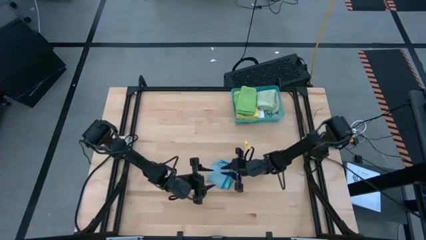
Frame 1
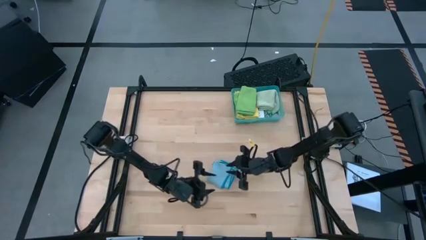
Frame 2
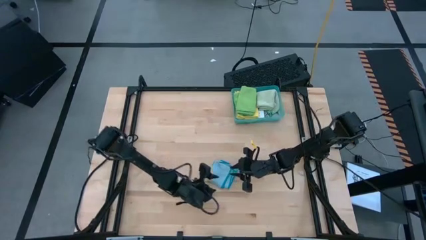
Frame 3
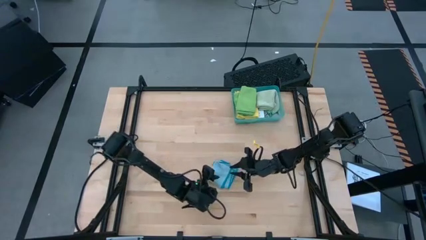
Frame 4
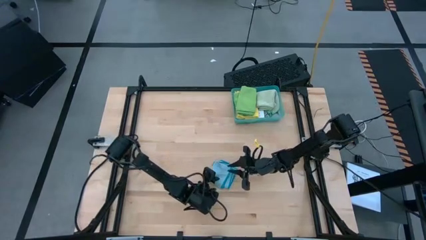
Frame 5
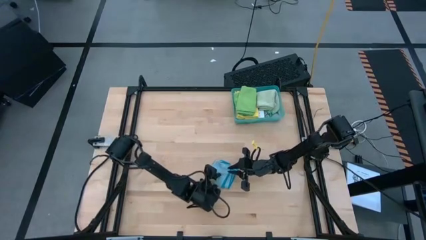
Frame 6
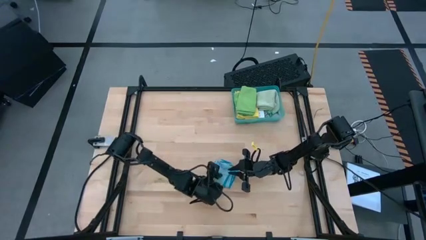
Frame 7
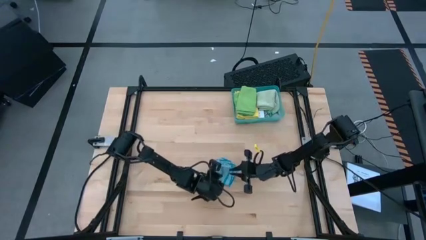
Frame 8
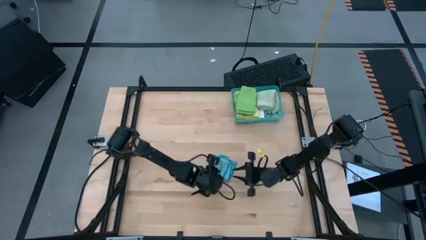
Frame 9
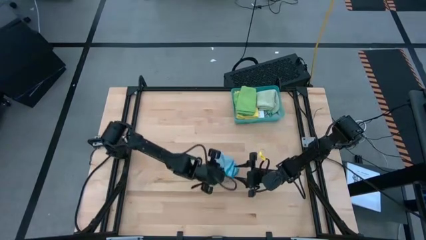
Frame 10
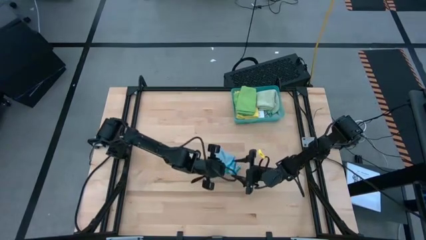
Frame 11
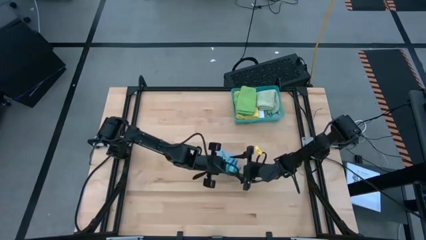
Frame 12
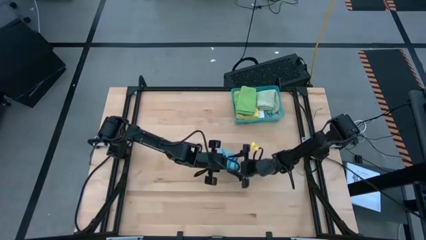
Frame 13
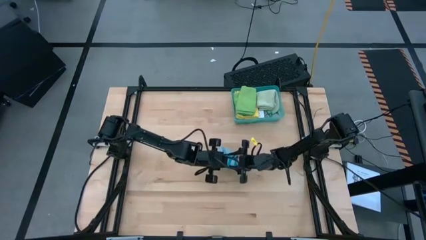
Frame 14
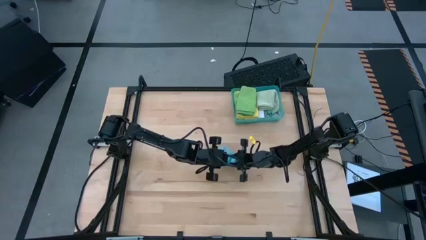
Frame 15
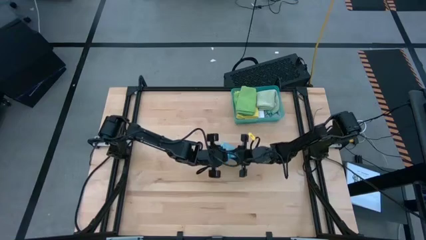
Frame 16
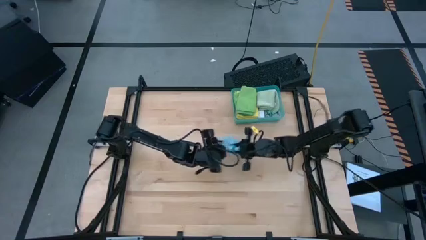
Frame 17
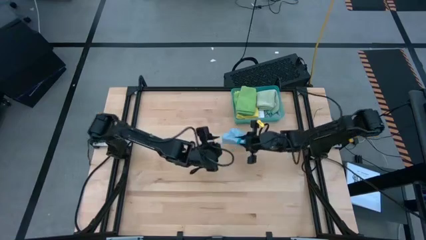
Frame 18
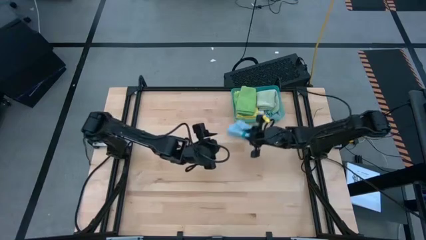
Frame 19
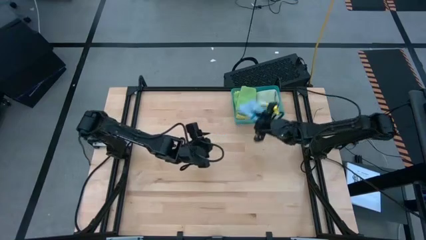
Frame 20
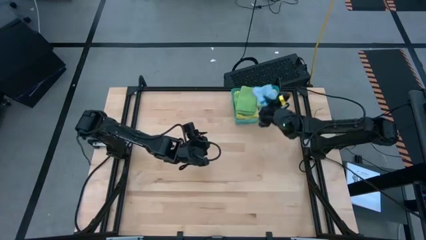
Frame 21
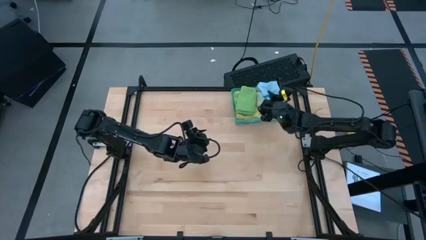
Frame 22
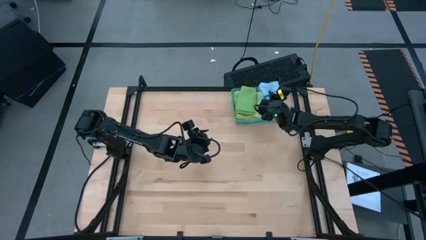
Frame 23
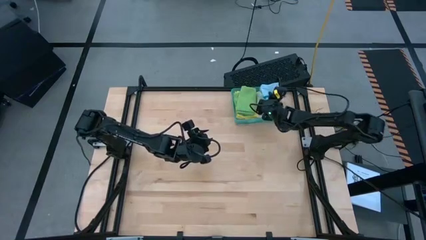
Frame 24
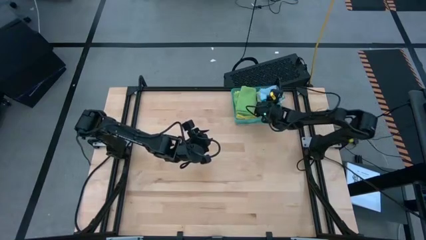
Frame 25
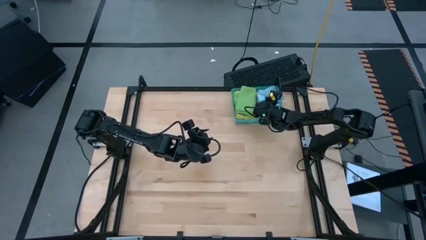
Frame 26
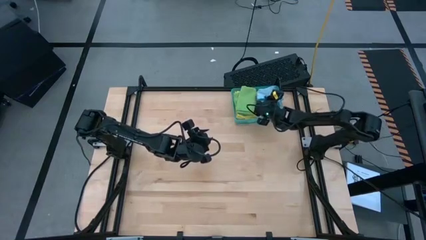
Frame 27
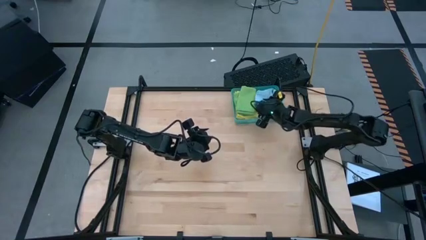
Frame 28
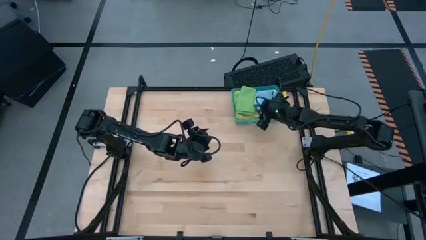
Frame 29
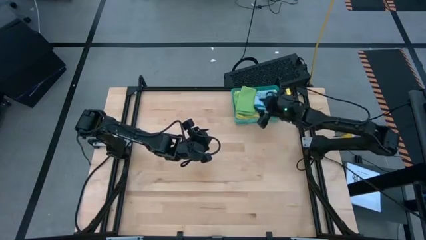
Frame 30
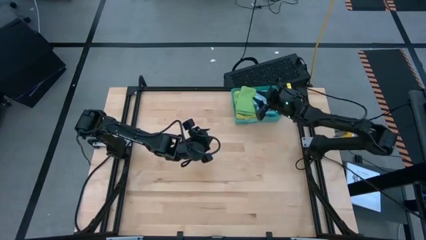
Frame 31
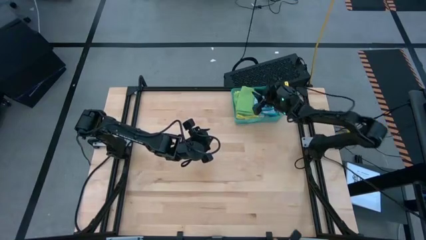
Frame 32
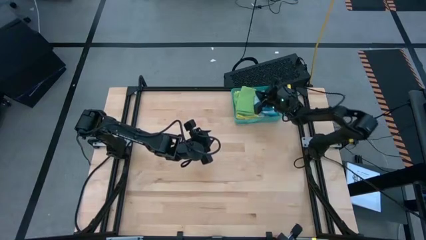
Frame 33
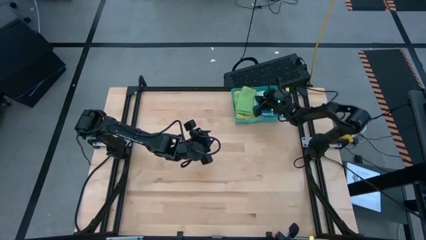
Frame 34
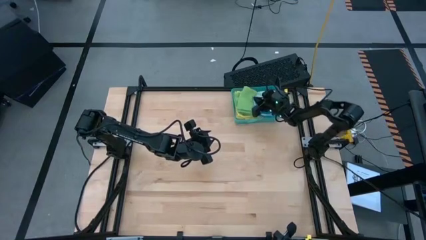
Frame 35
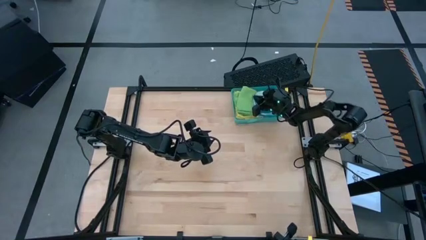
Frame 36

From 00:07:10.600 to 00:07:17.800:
Task: Fold microfiber towels
Put the folded blue microfiber cloth into the bin

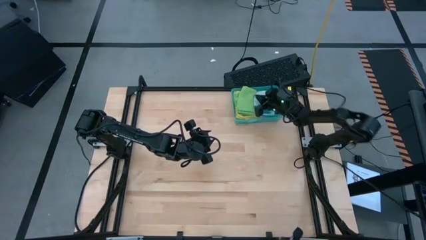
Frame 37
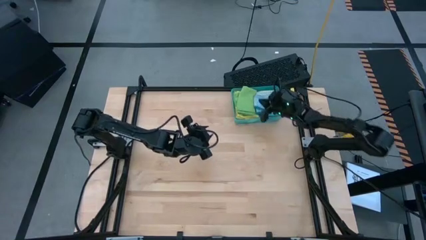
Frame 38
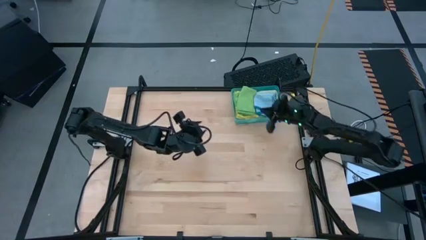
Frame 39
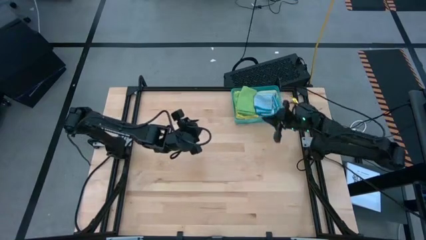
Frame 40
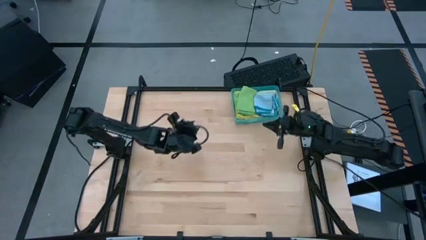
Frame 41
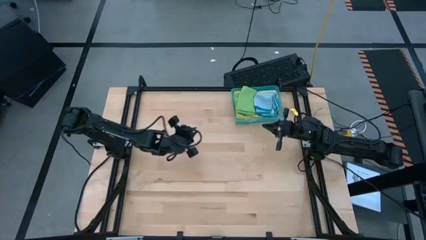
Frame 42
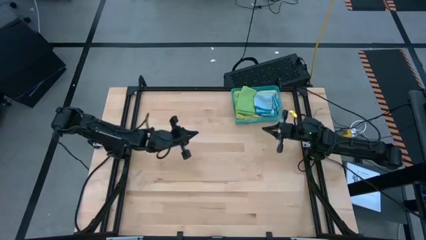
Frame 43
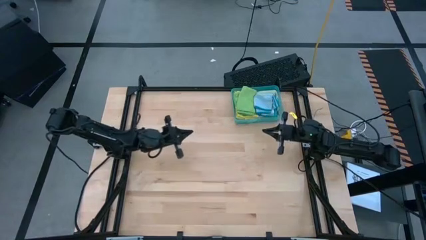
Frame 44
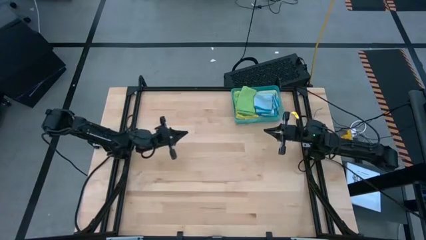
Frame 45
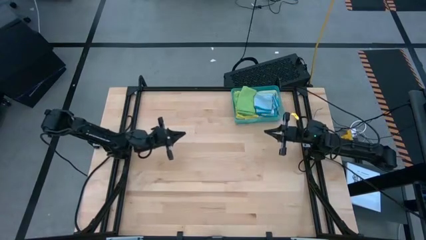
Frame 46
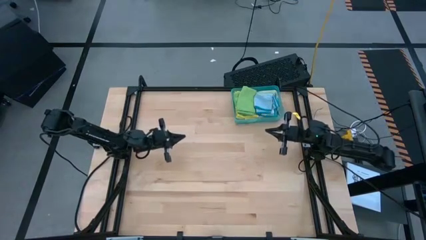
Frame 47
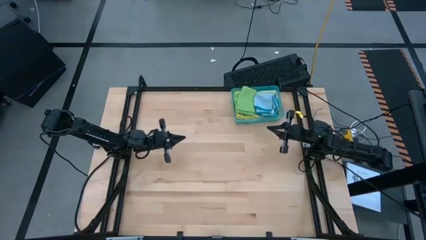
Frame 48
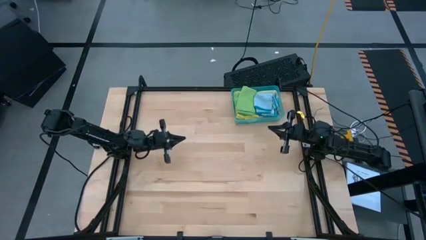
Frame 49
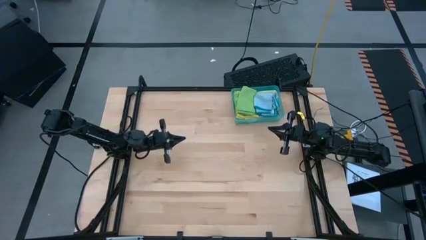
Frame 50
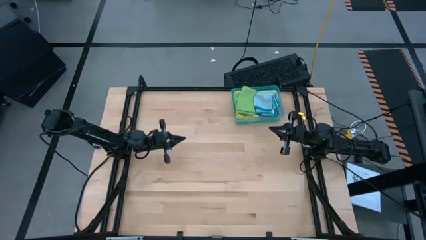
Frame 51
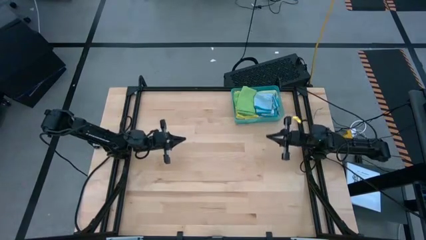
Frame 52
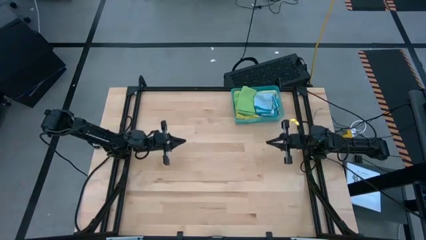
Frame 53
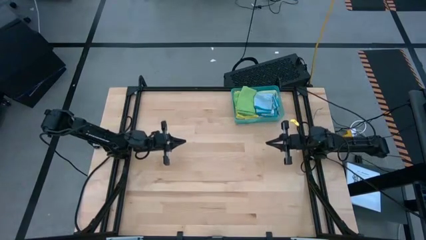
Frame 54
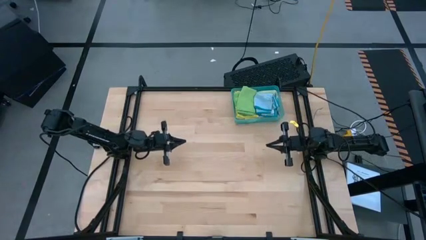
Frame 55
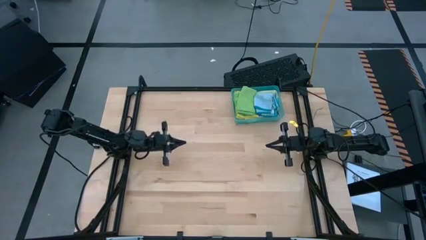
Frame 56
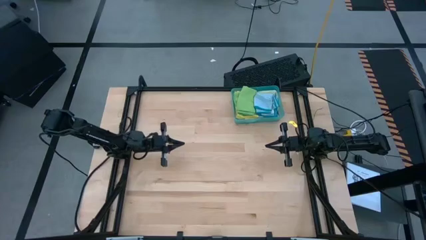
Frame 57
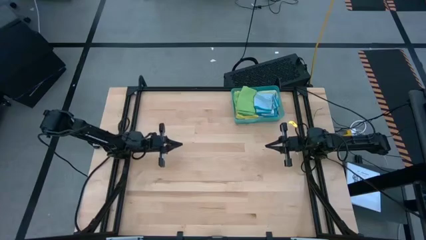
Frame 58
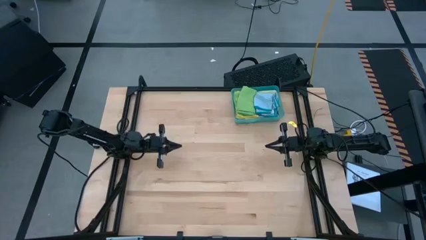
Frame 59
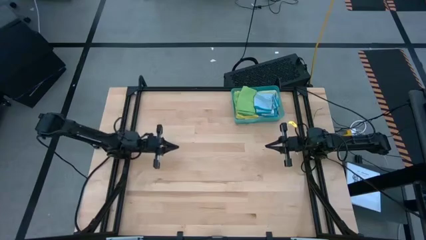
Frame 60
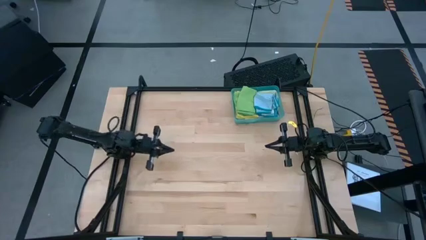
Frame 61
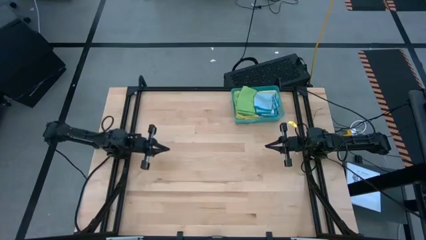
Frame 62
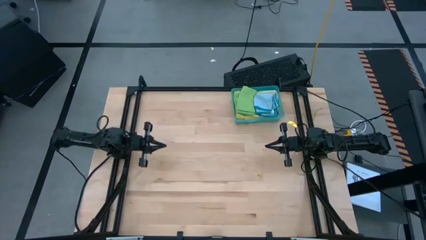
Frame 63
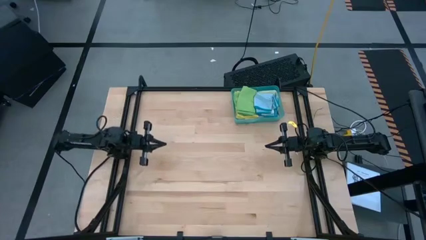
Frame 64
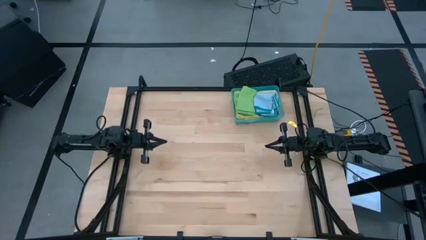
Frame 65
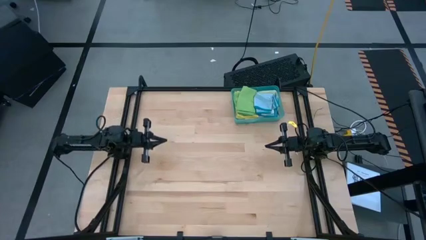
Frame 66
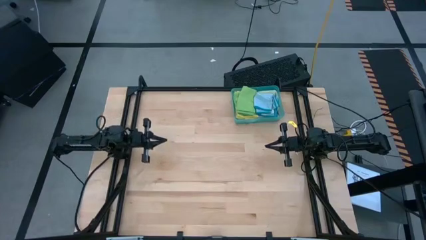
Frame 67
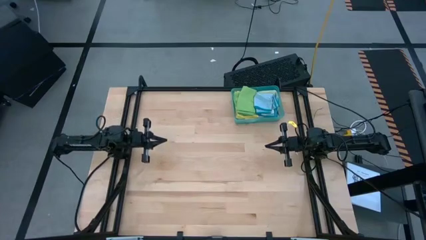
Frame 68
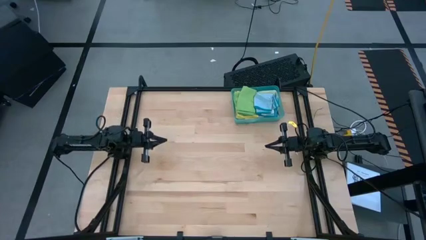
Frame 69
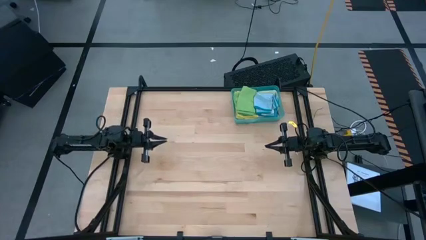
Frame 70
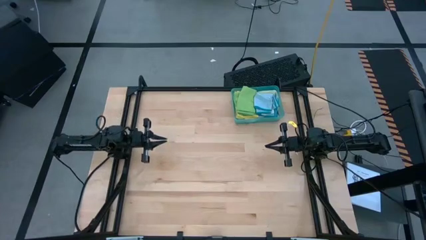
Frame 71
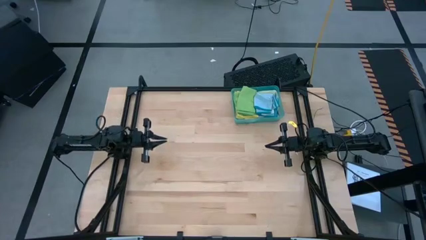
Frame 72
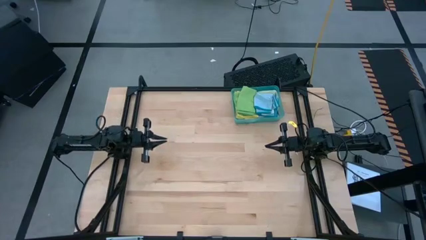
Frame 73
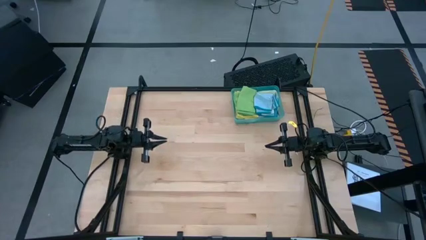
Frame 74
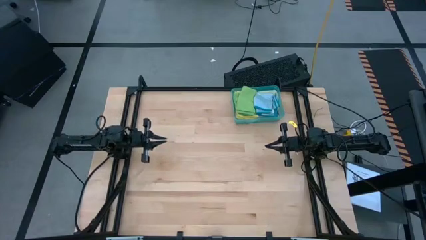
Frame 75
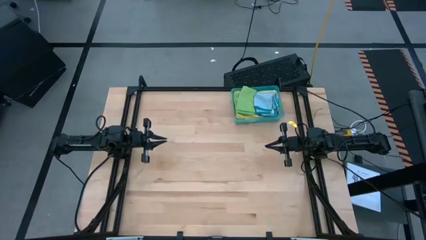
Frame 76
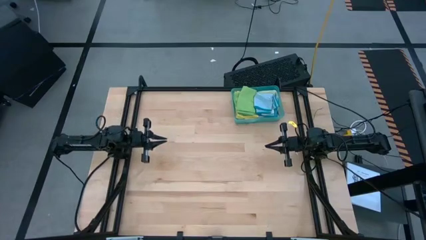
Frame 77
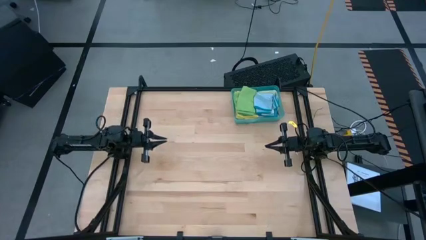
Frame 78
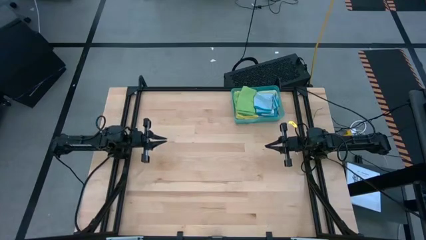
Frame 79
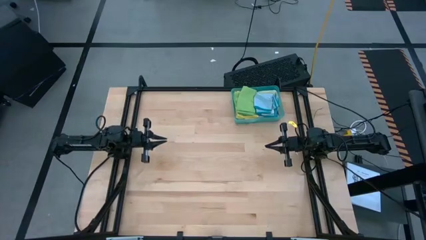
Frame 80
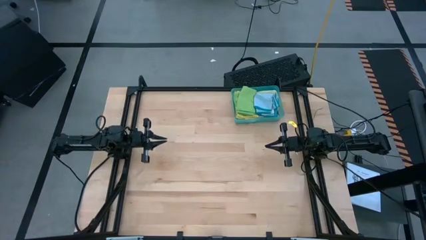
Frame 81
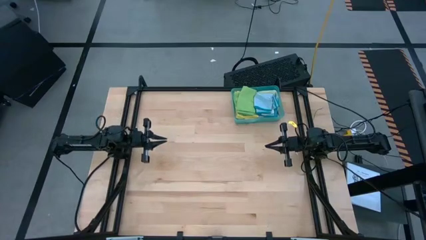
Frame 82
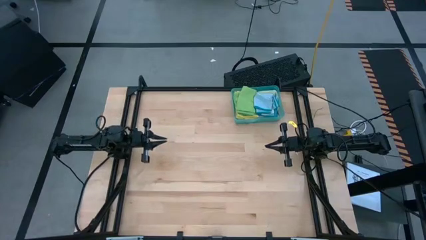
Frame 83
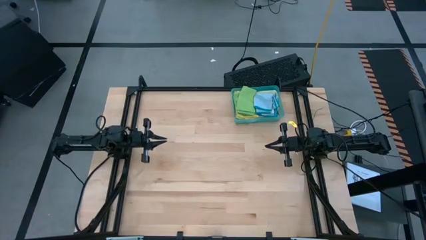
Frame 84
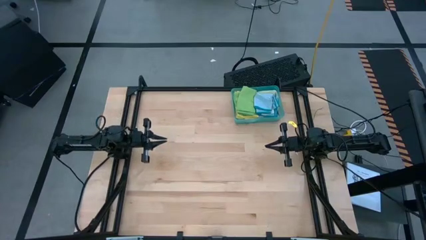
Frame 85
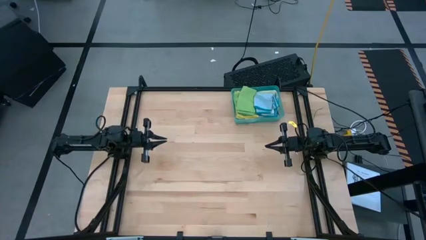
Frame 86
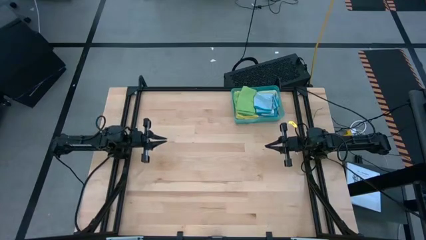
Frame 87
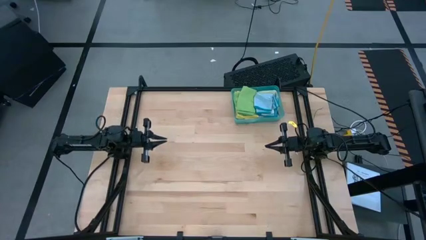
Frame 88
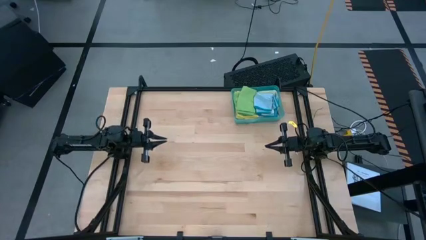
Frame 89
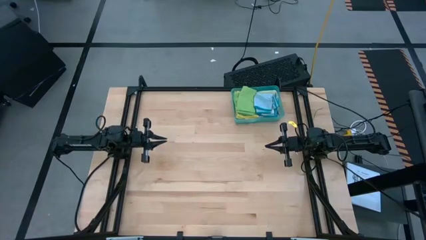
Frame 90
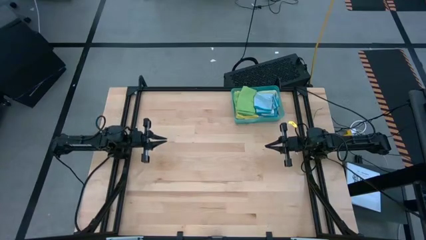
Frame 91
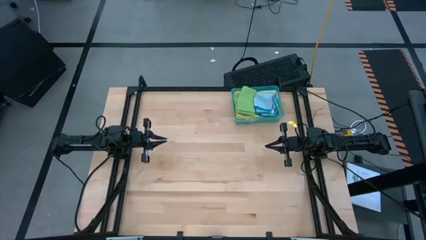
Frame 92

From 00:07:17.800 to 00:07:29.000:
Return to Home Position
